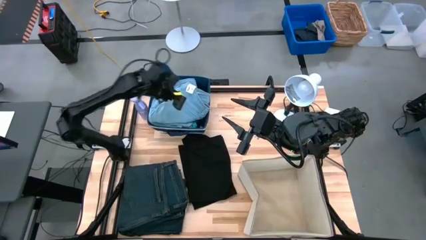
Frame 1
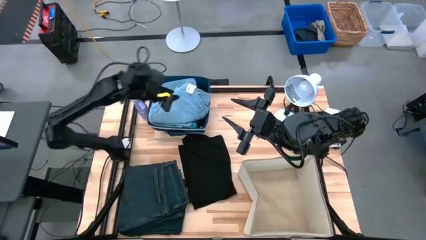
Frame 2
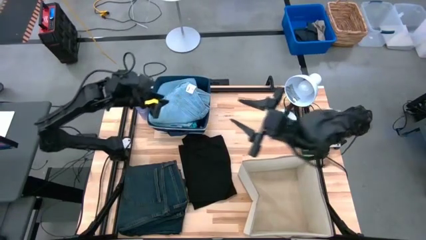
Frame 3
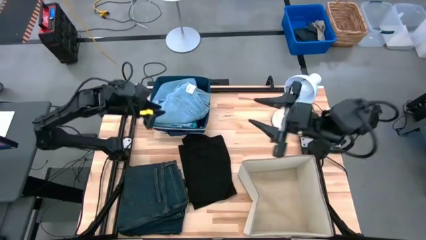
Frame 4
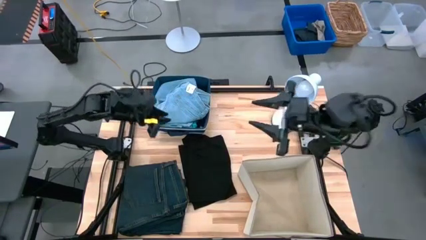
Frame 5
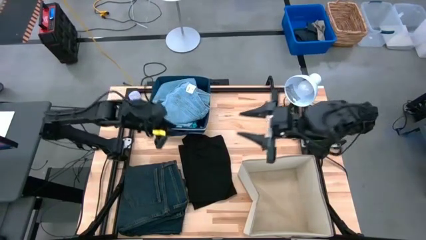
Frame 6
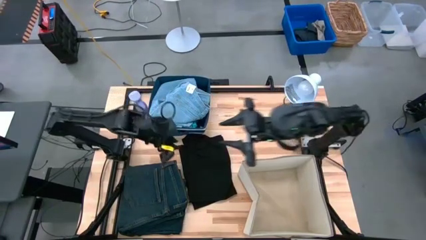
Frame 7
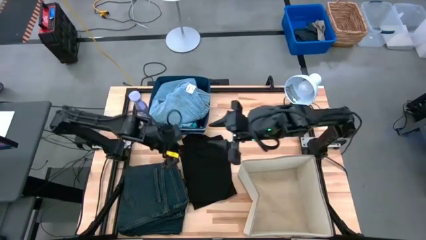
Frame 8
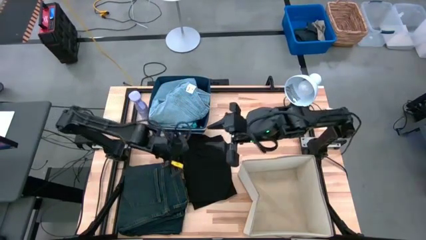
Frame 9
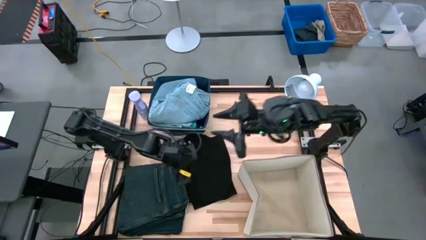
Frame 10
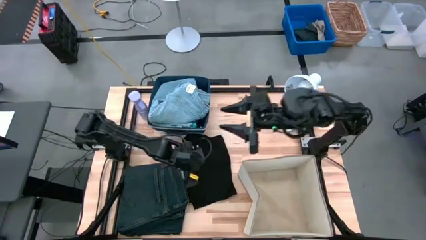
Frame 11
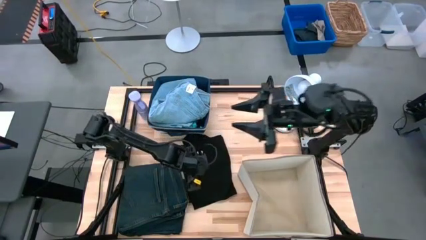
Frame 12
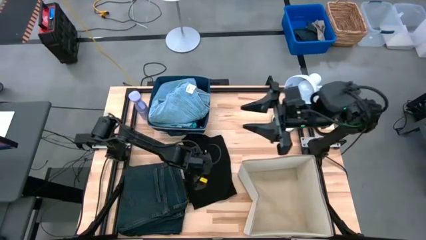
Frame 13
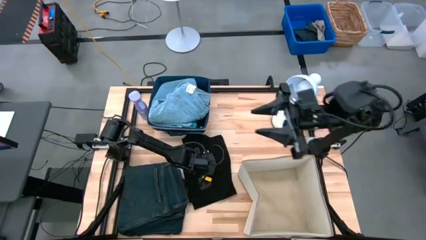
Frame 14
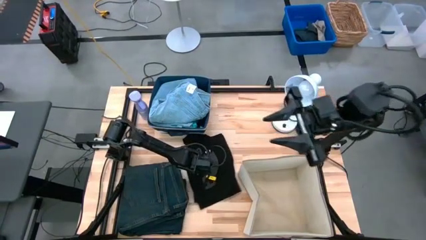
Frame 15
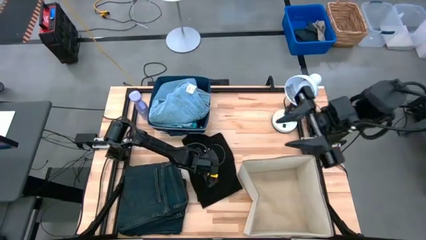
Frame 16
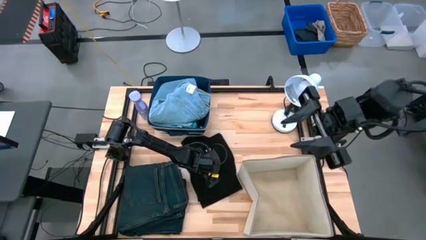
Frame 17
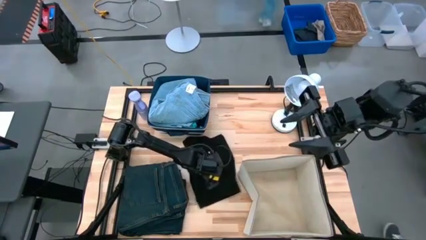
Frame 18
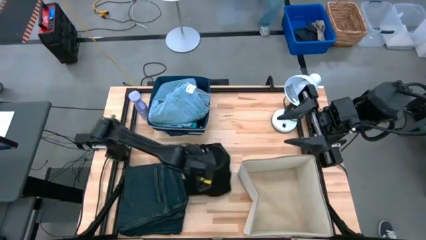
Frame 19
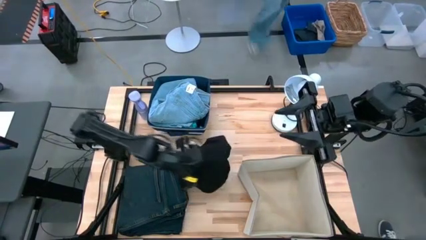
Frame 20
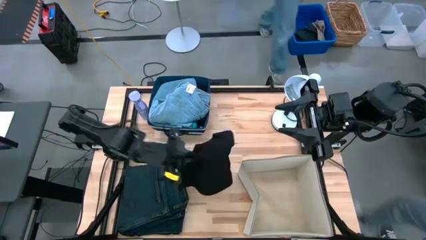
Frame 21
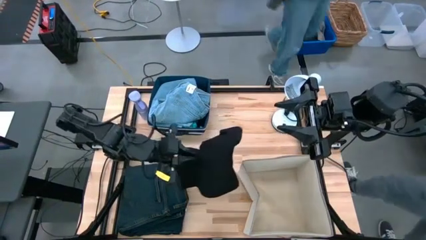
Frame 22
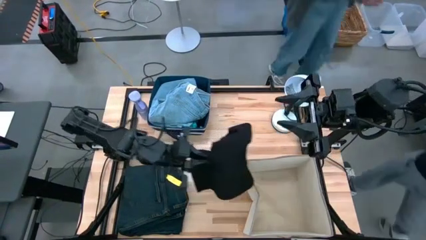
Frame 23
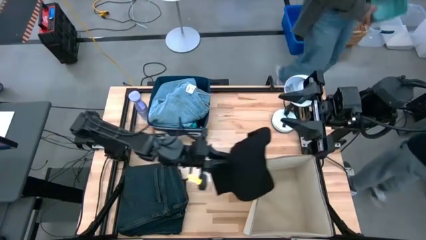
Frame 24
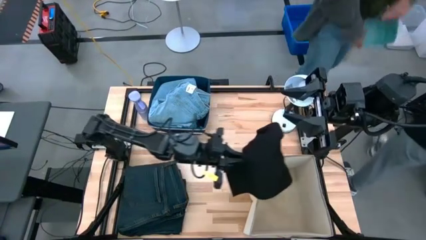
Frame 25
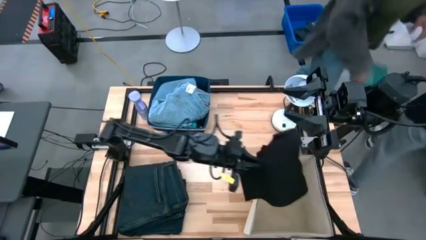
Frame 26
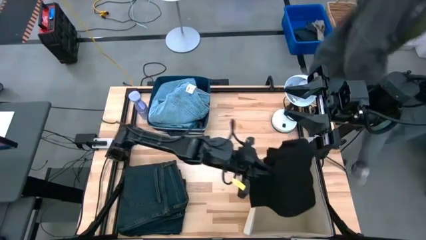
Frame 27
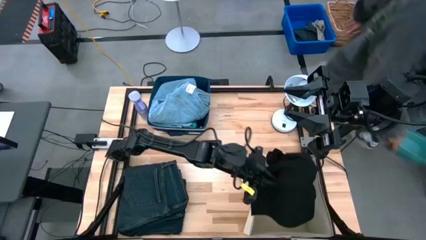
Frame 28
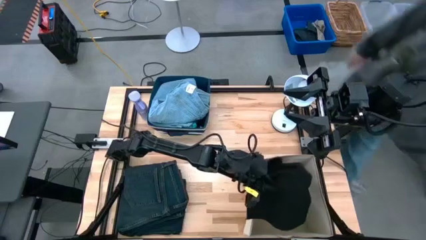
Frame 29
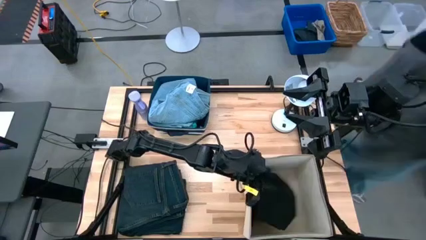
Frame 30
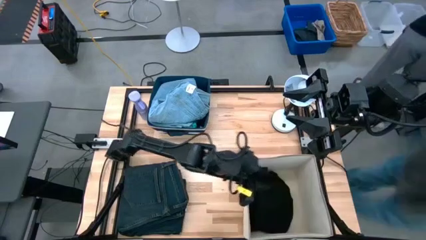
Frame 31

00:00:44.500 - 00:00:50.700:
Task: Sort clothes
Put the black shirt into the white laundry organizer

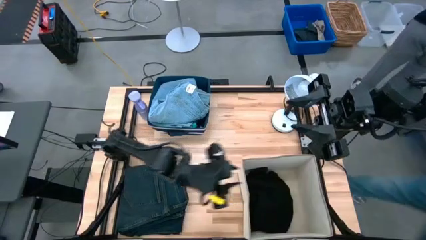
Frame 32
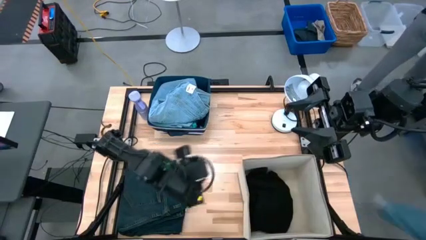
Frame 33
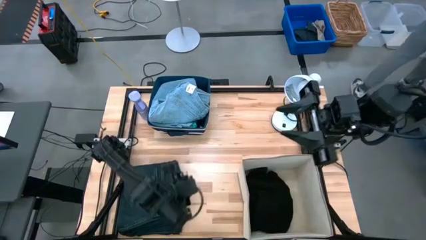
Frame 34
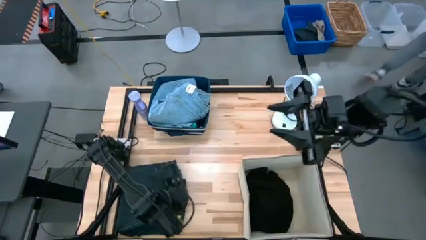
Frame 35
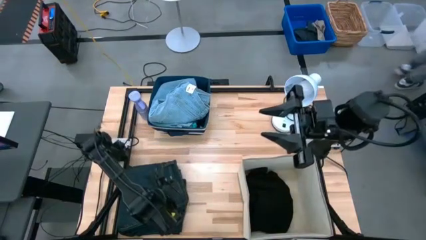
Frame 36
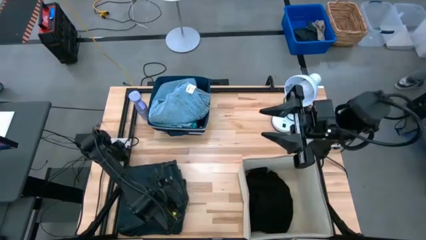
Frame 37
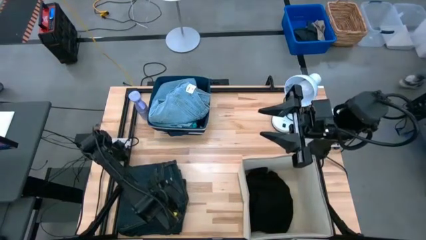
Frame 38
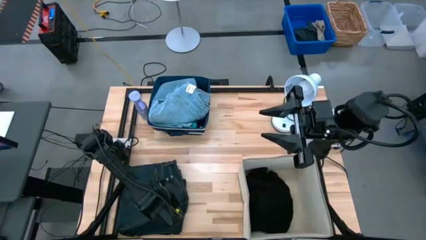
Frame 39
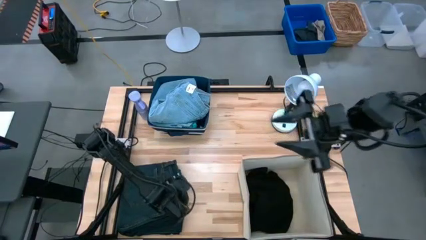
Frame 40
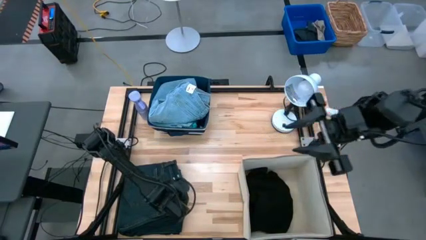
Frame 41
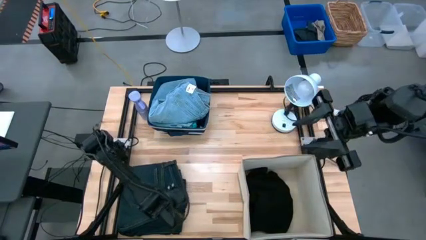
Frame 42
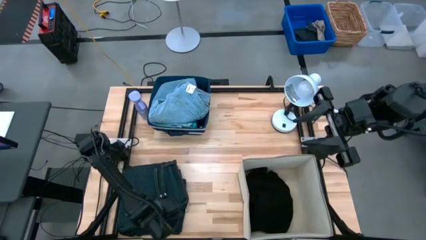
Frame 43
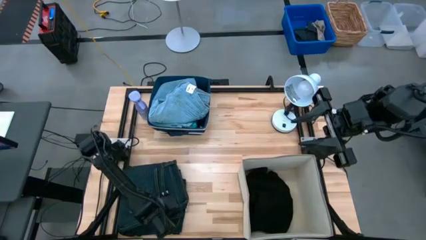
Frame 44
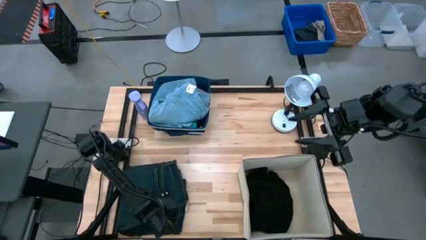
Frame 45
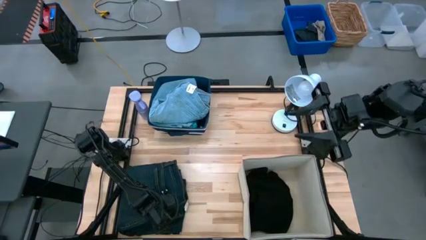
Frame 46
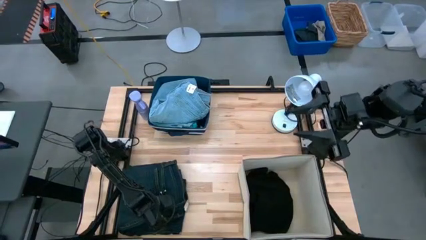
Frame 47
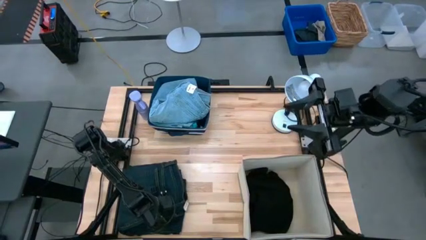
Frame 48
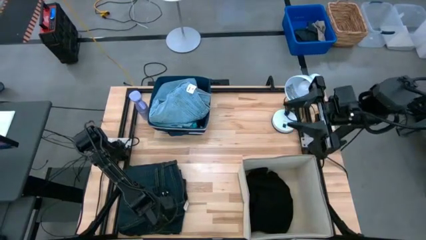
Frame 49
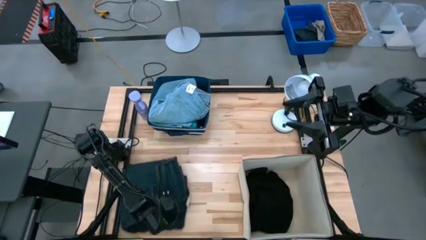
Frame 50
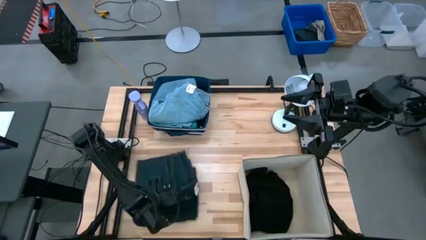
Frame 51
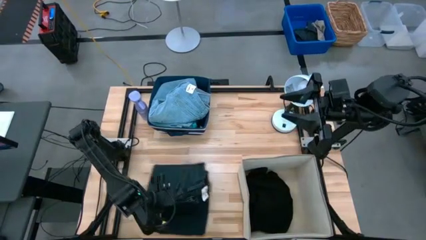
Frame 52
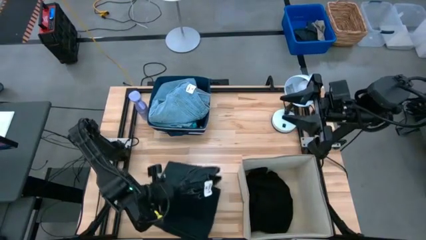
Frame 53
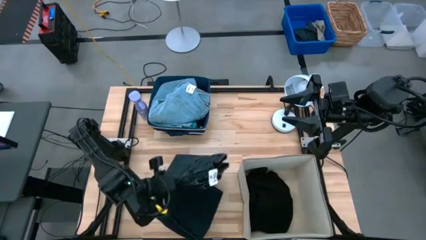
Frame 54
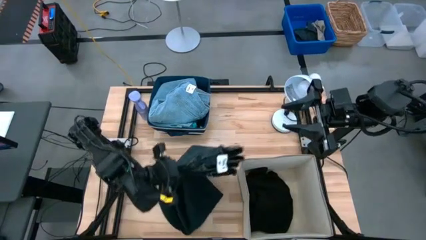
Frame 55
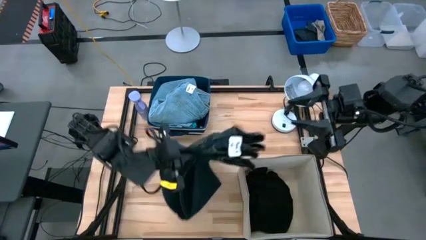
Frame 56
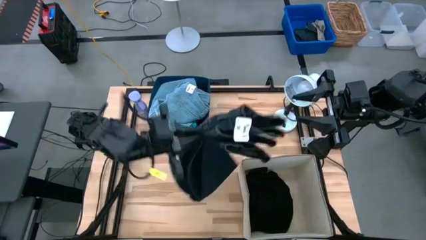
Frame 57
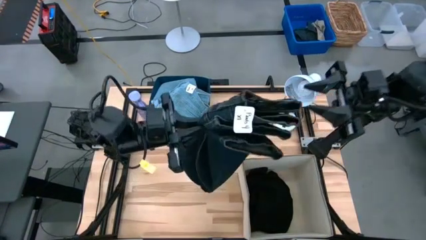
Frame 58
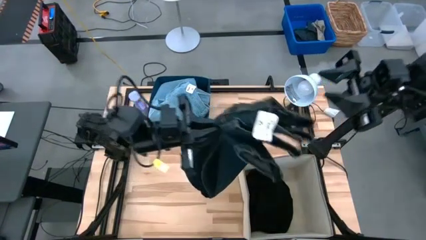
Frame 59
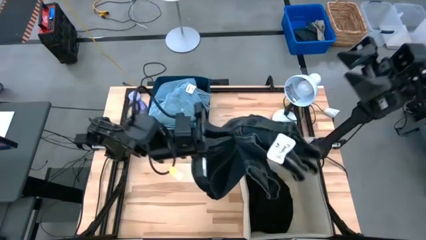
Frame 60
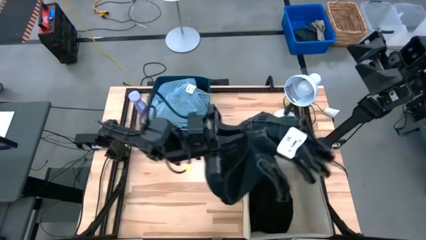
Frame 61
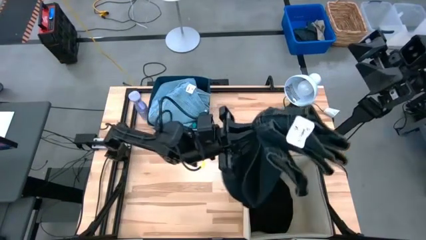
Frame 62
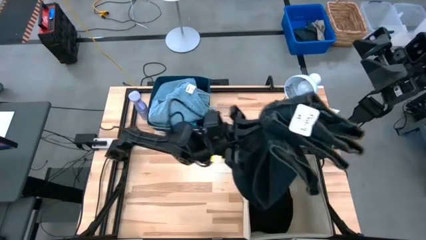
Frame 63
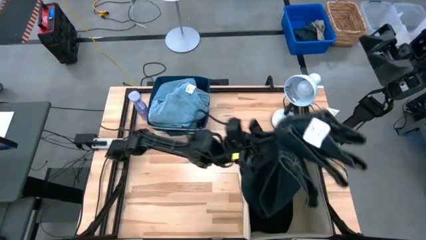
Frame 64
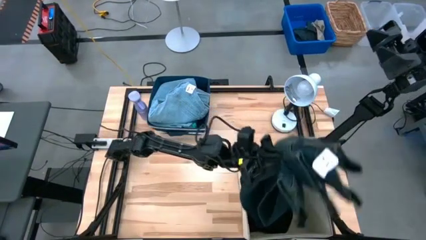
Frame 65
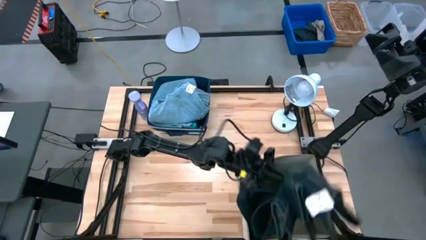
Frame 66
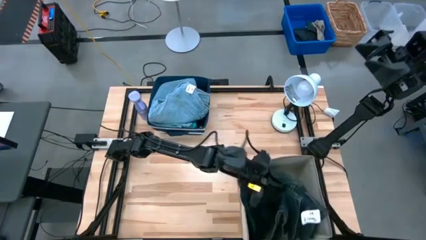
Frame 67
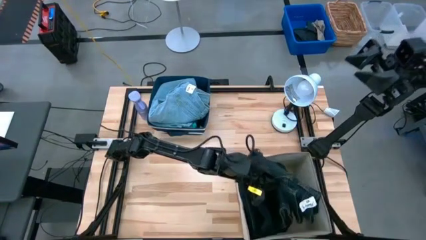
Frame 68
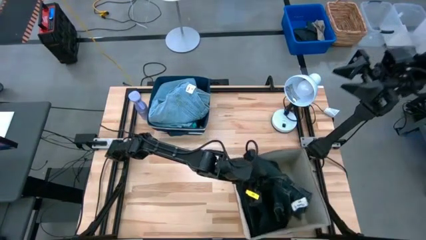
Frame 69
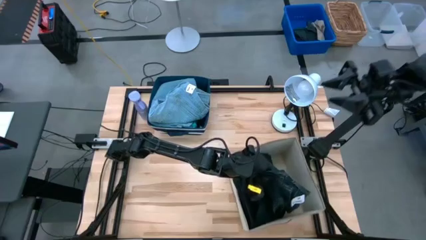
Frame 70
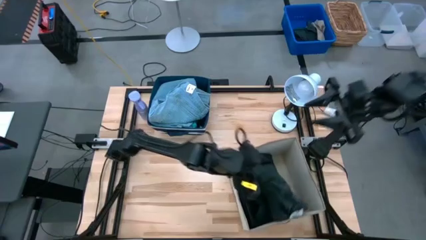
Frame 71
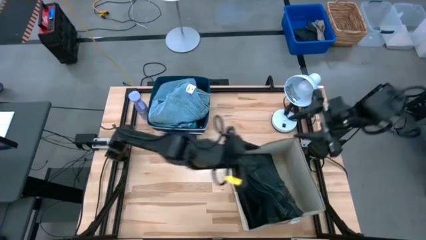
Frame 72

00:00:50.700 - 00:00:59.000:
Put the black pants into the white laundry organizer

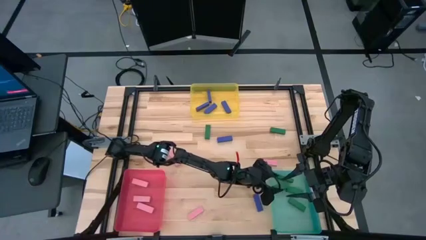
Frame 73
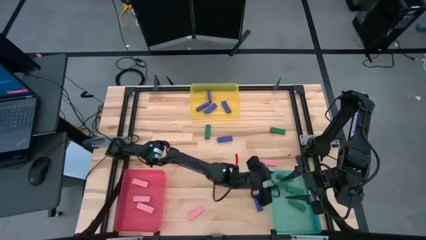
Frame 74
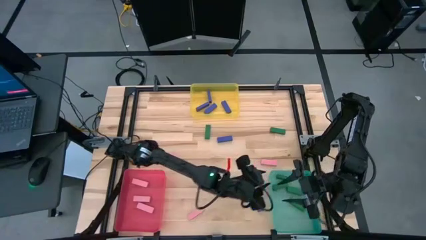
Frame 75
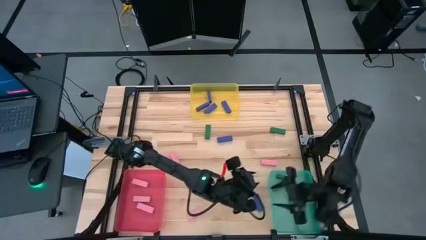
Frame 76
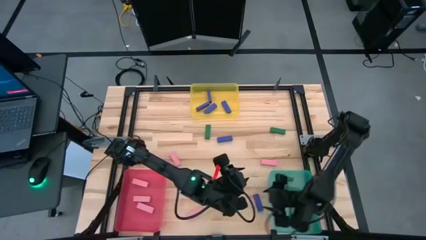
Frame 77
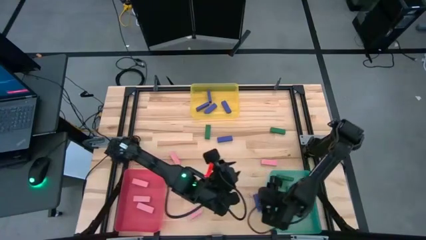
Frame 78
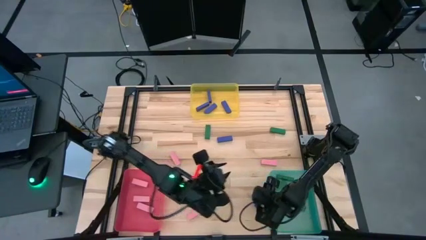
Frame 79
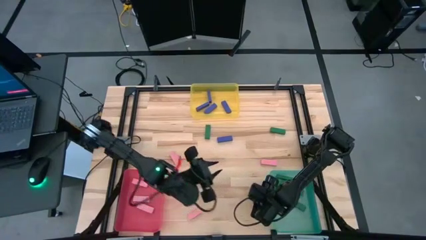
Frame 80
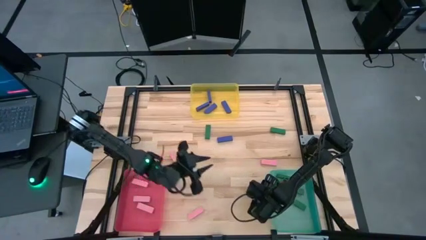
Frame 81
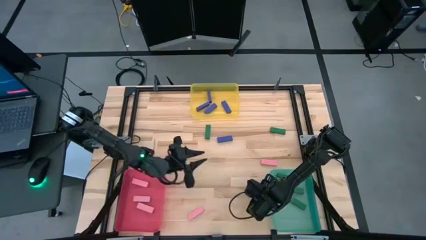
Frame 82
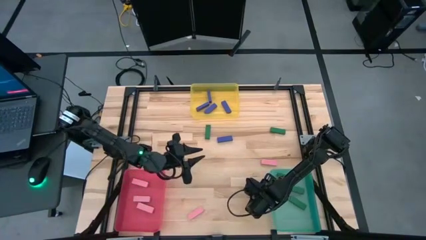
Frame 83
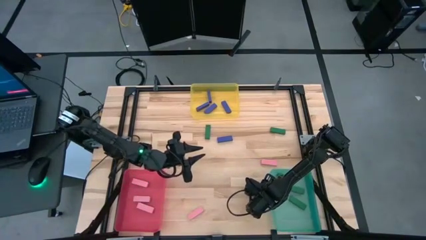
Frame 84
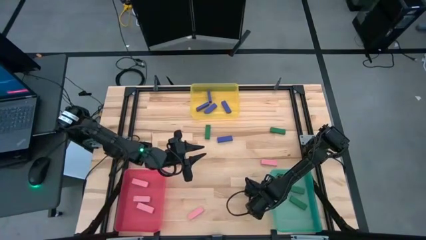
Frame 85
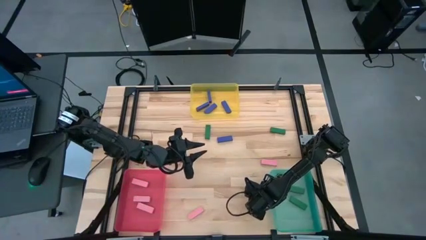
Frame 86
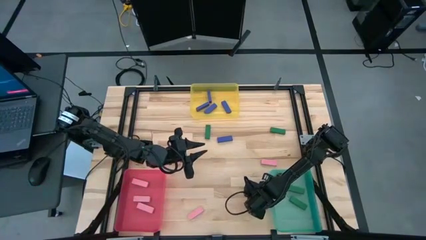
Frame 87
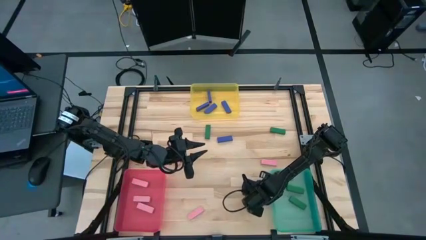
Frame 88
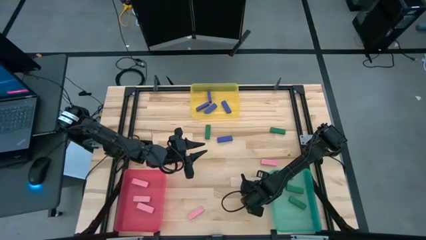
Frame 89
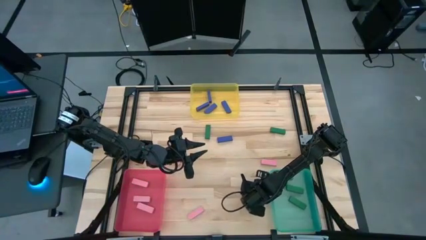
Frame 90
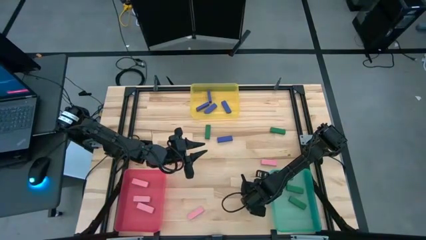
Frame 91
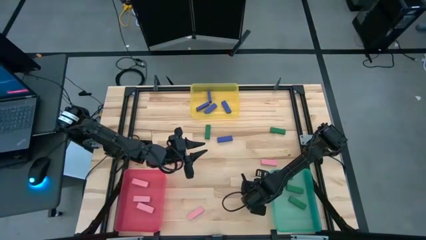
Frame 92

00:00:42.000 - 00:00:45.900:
Task: Sort blocks
Put the blue block into the yellow bin
